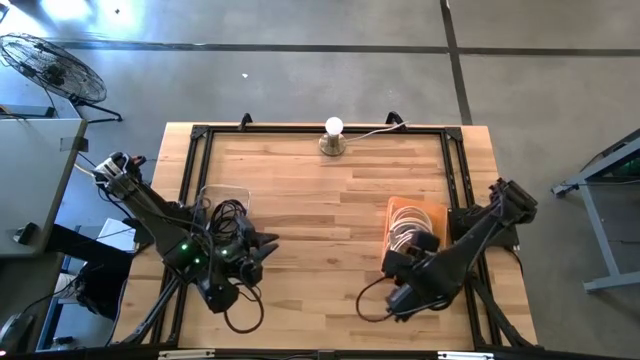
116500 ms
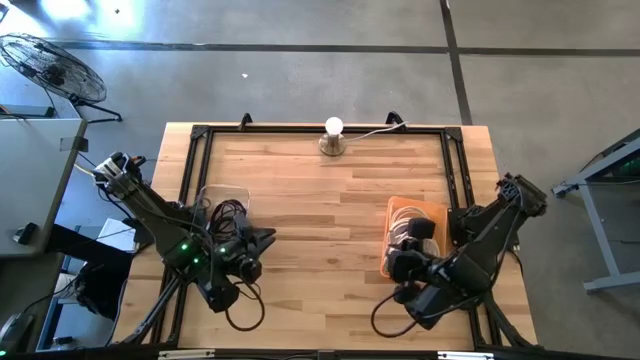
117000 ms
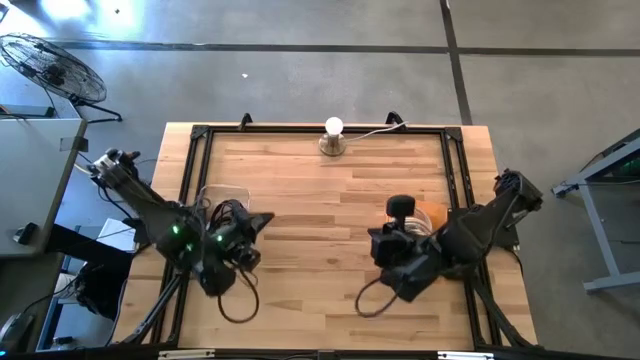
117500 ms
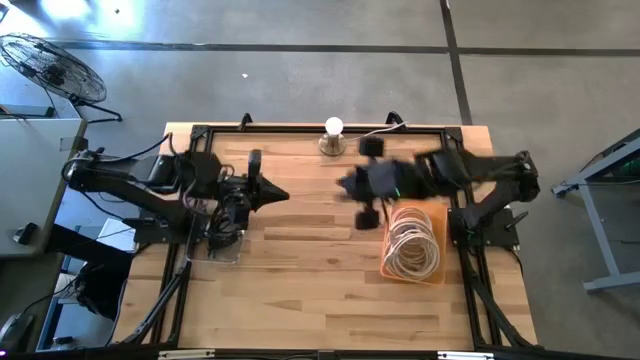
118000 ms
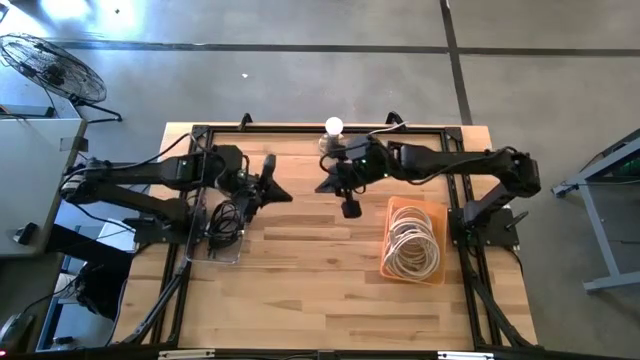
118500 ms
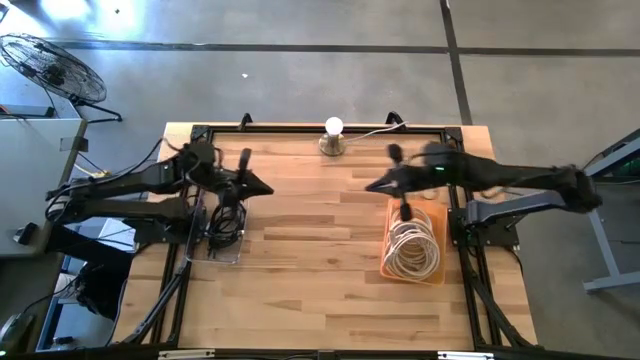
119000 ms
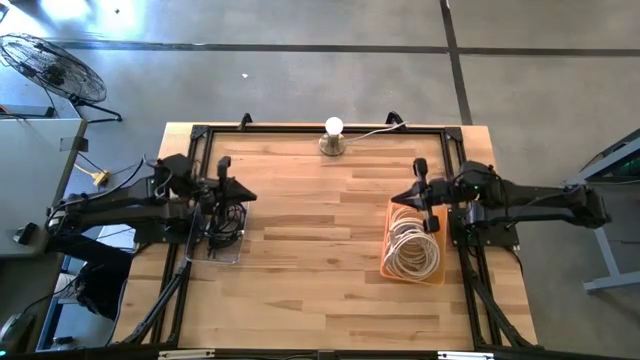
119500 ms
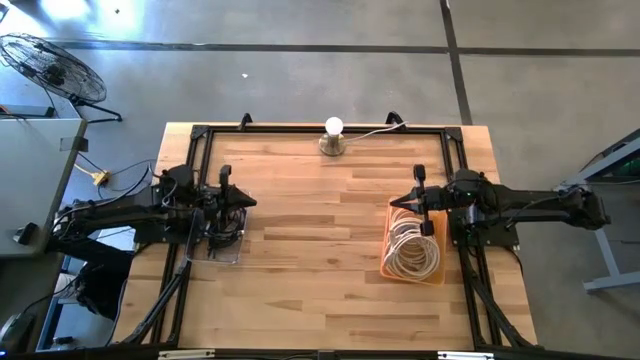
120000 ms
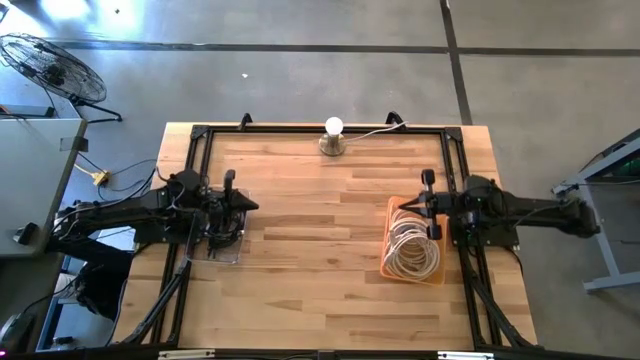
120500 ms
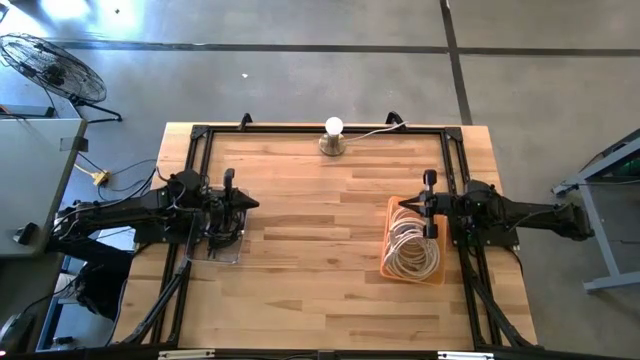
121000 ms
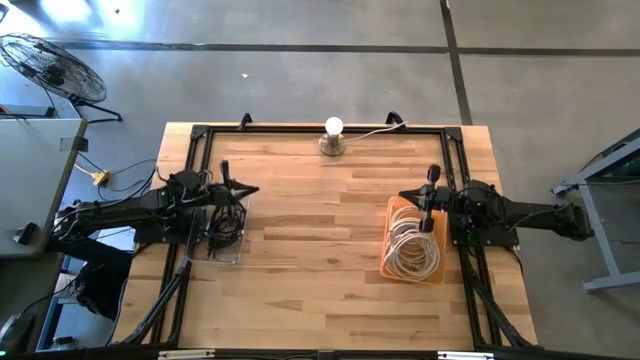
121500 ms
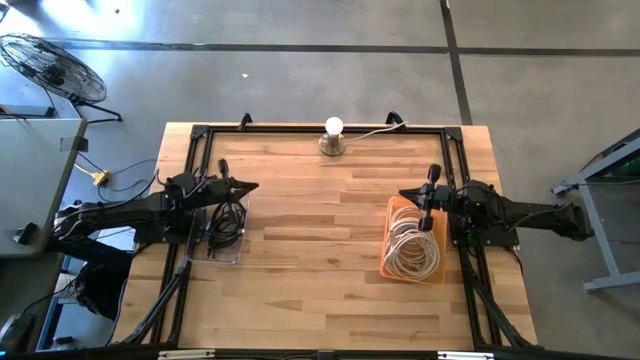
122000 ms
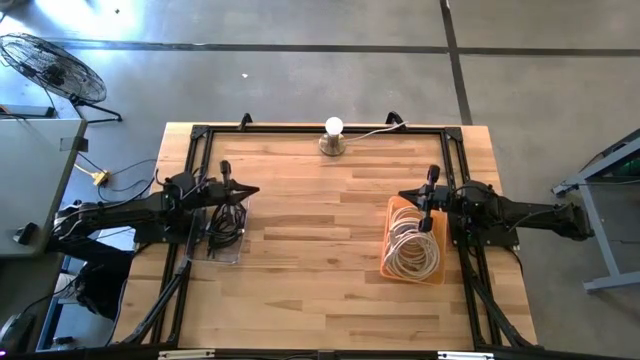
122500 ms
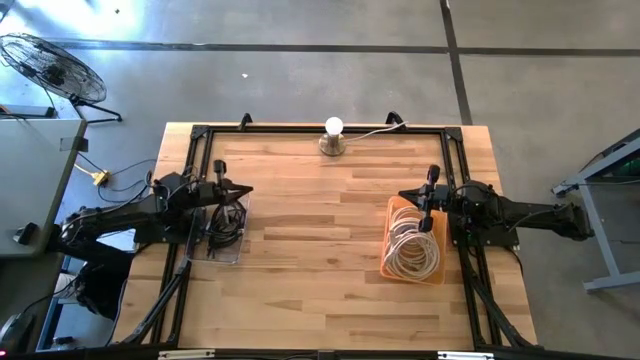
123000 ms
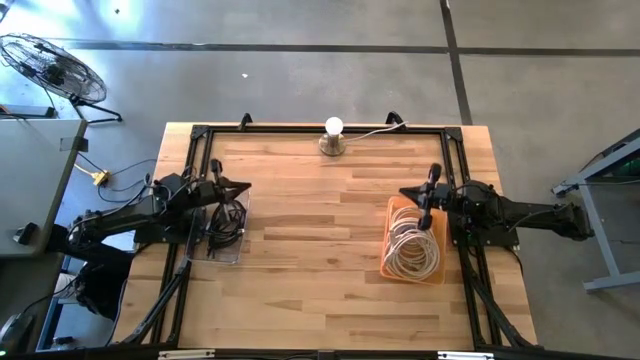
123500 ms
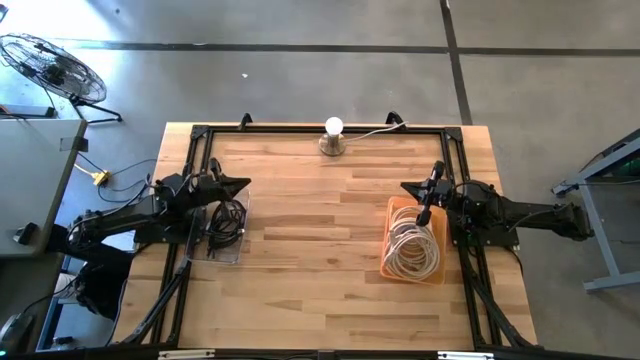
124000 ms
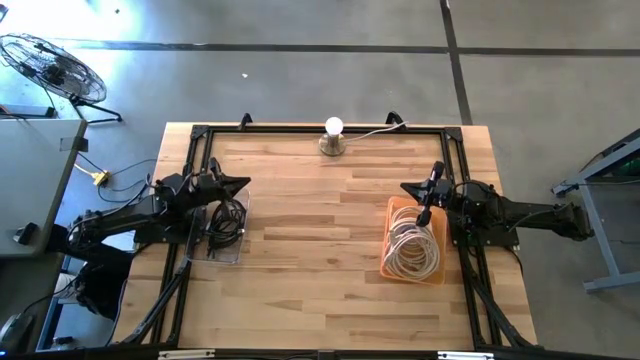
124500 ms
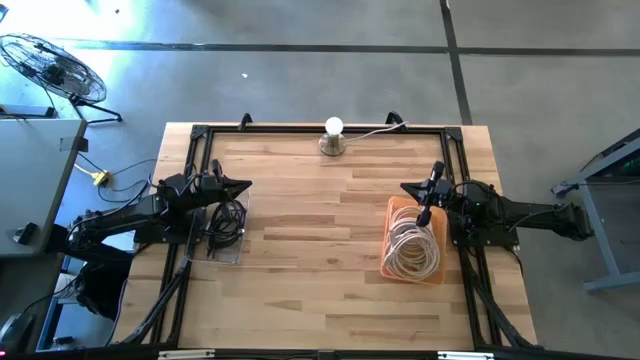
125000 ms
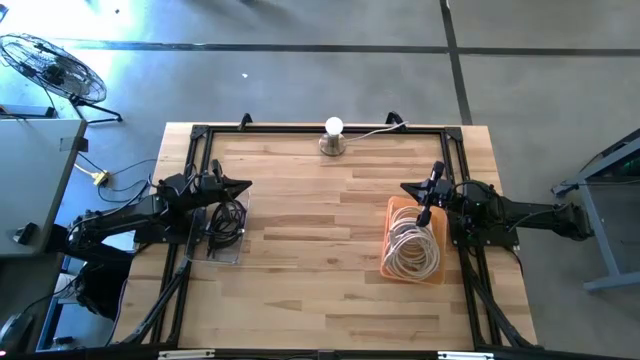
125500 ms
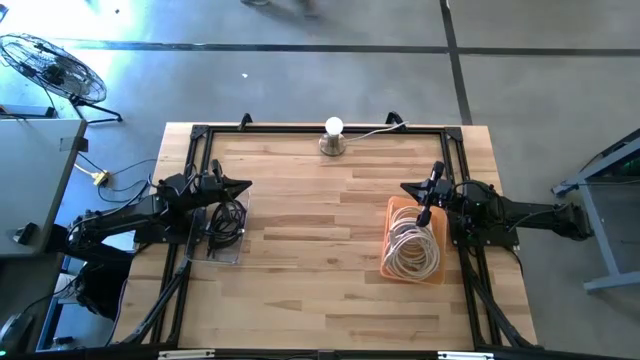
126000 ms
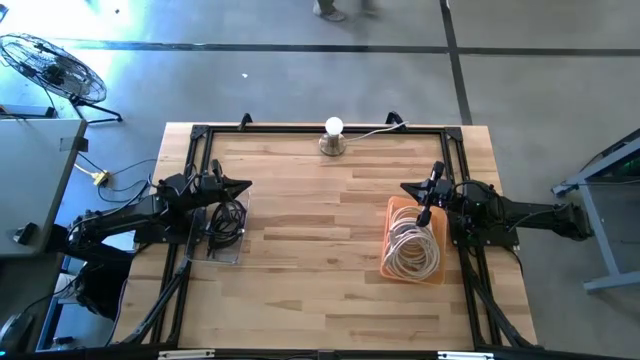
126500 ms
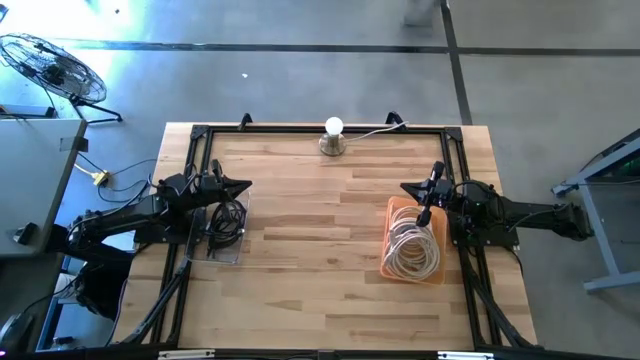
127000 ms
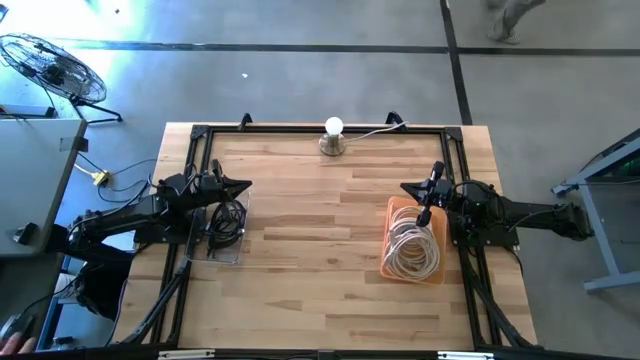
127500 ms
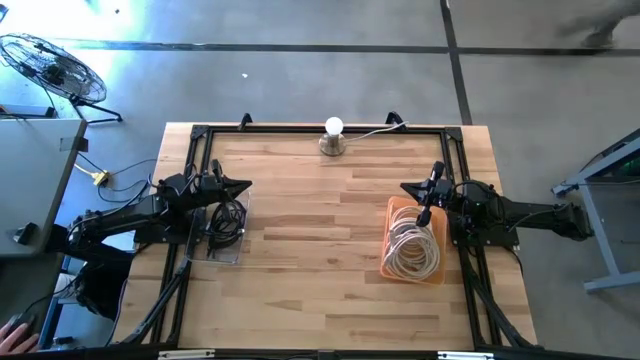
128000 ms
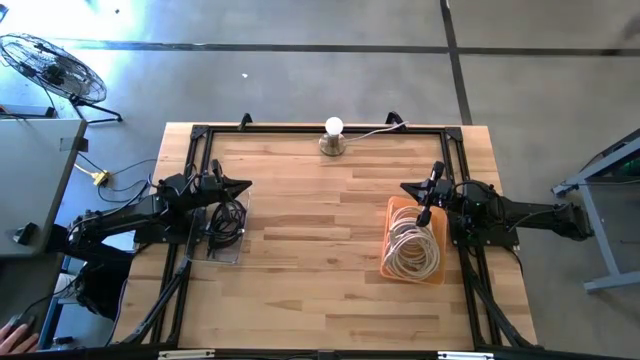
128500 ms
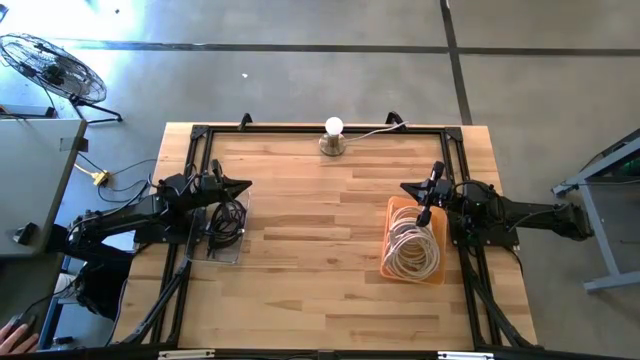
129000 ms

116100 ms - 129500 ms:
Task: Pick & Place USB Port
Return to Home Position

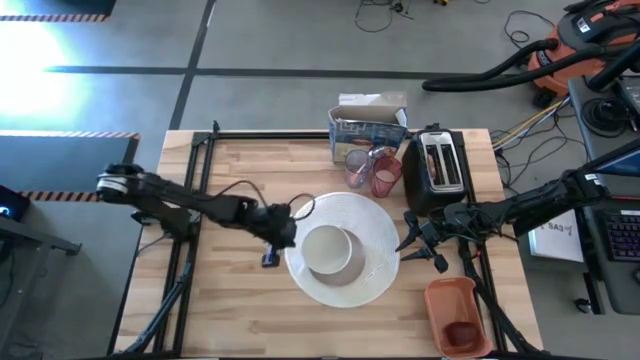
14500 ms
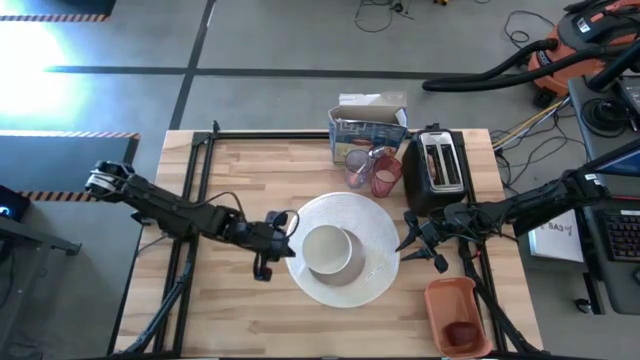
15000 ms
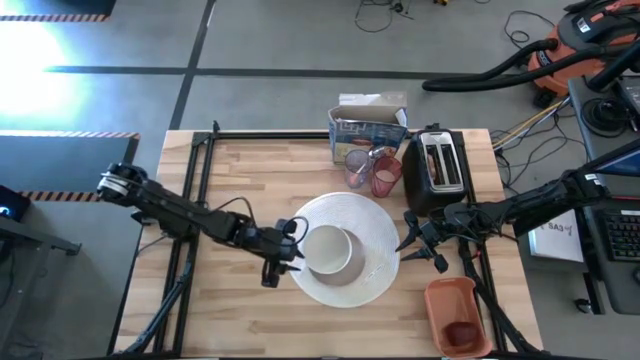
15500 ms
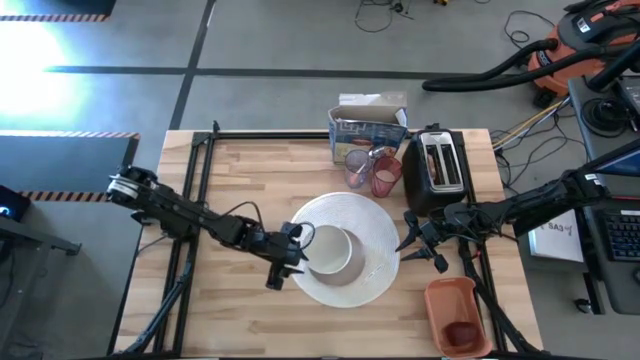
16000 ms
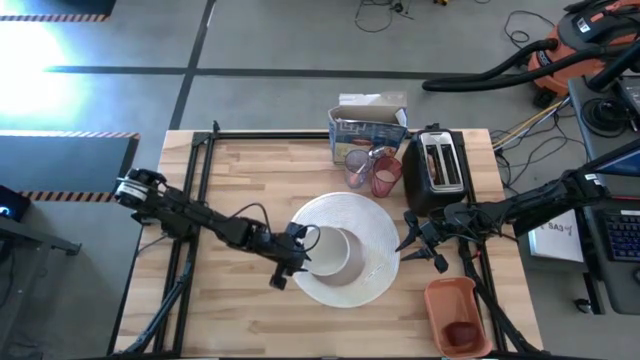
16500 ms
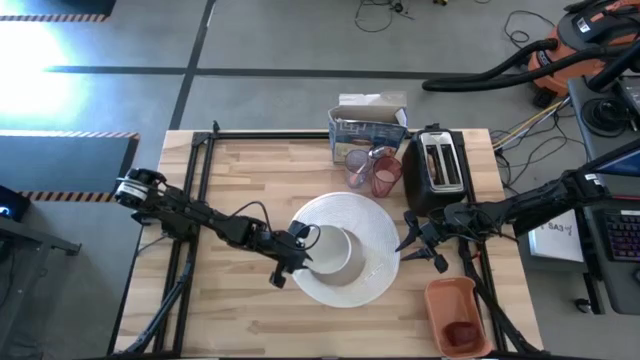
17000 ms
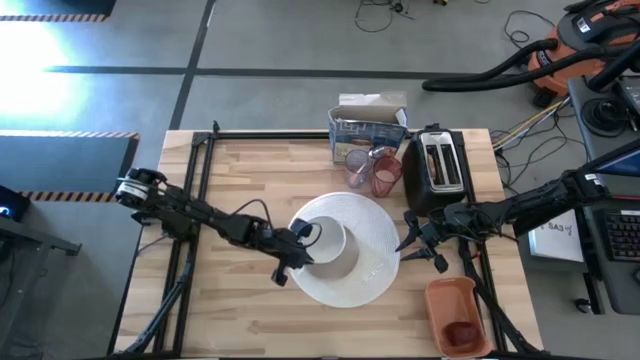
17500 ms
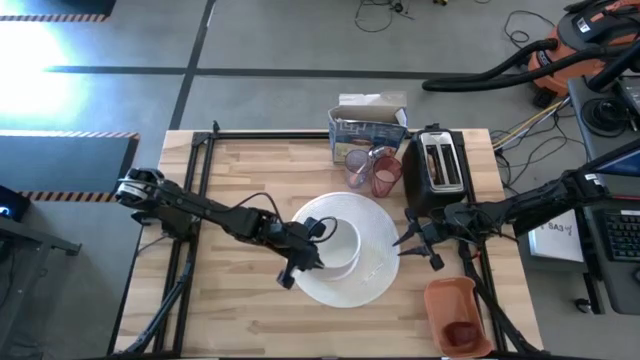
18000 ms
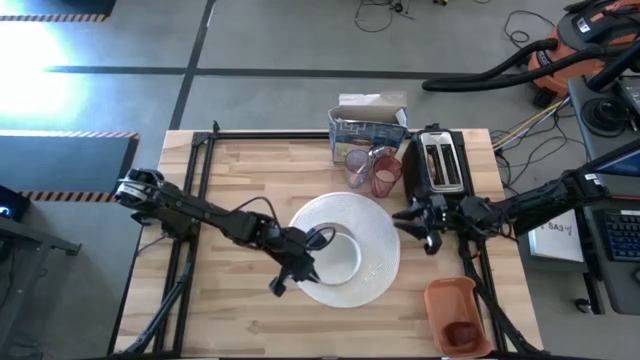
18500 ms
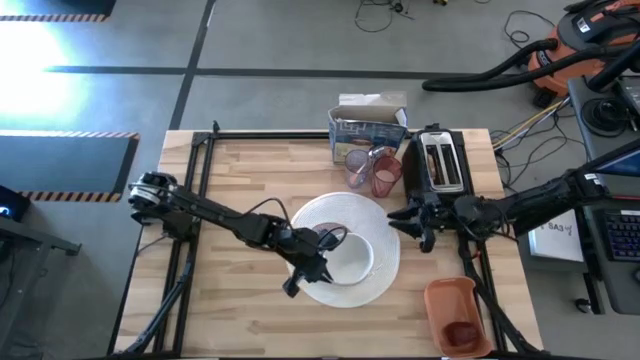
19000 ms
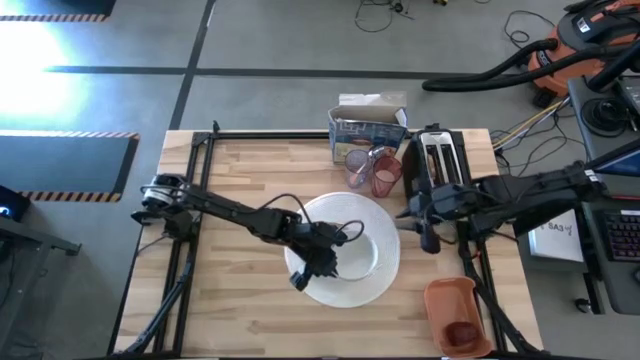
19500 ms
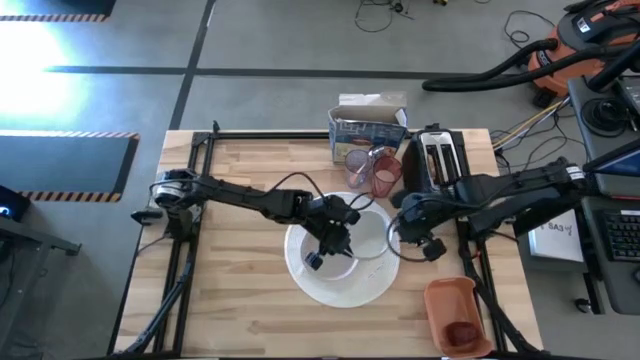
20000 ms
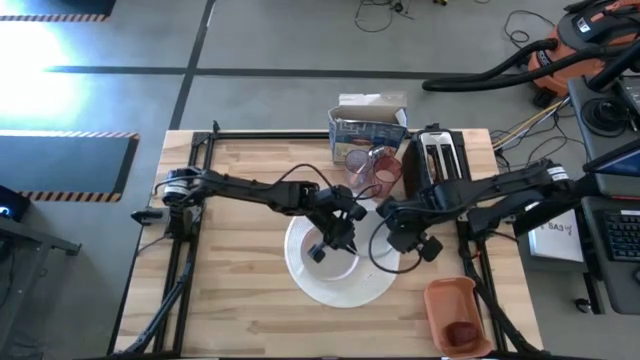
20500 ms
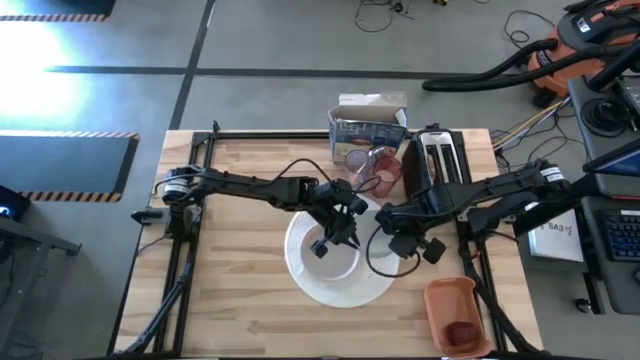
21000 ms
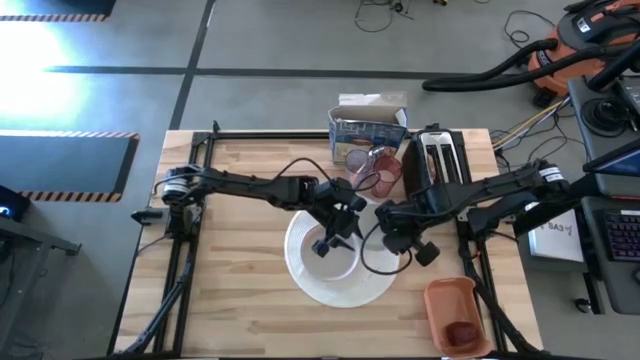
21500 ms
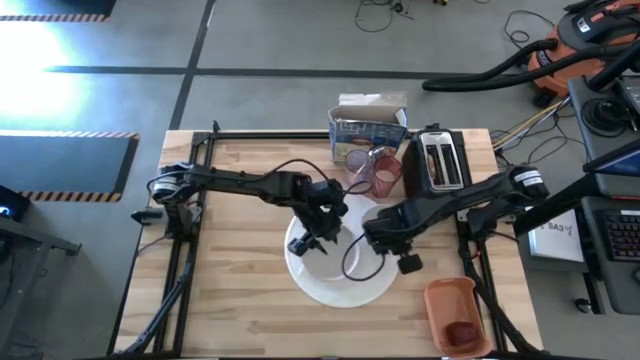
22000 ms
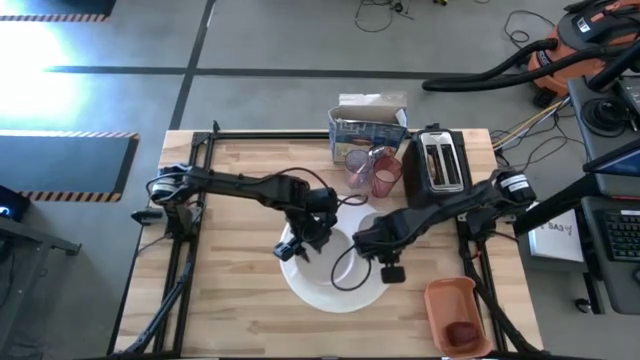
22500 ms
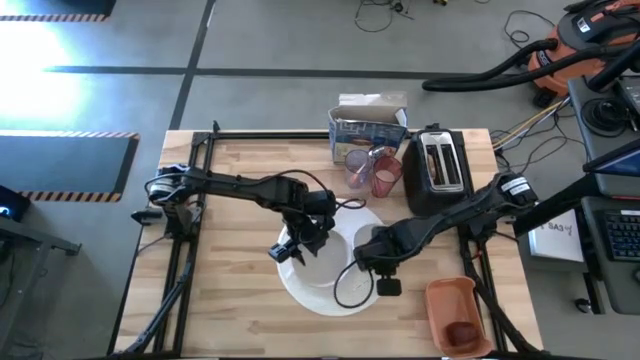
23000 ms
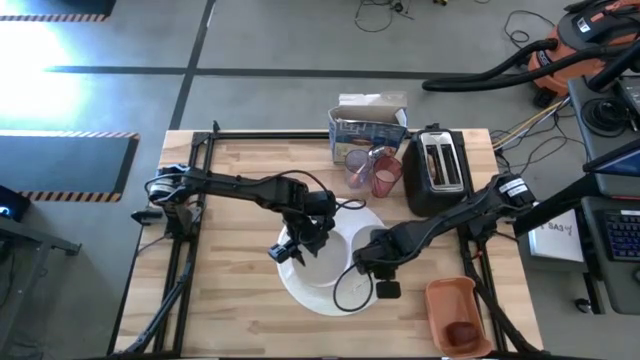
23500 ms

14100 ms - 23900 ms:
Task: Arrange a breakfast setting
Put the white bowl on the white placemat to the right of the gray plate
